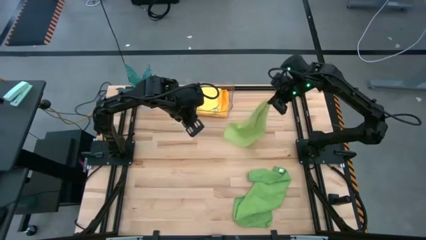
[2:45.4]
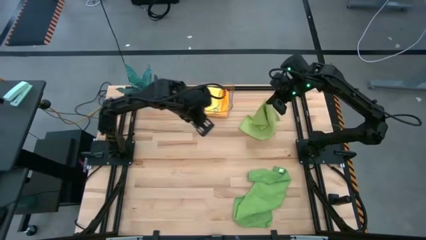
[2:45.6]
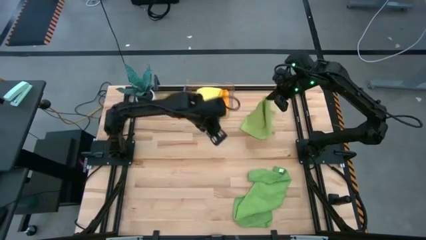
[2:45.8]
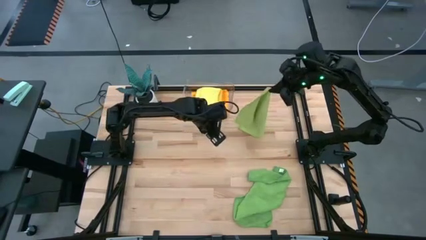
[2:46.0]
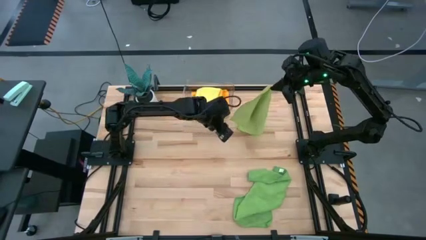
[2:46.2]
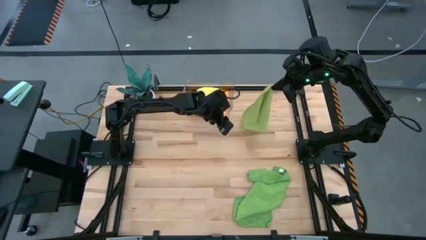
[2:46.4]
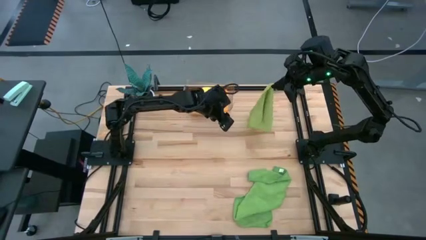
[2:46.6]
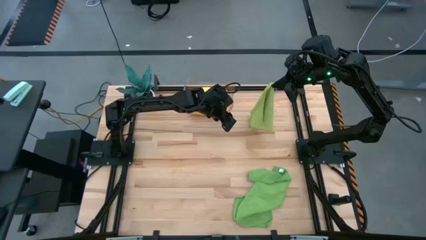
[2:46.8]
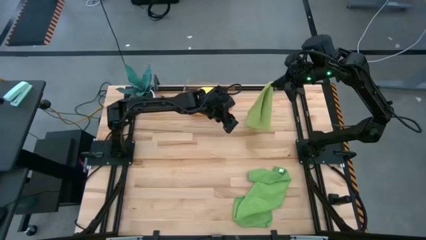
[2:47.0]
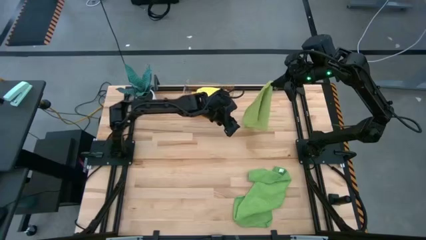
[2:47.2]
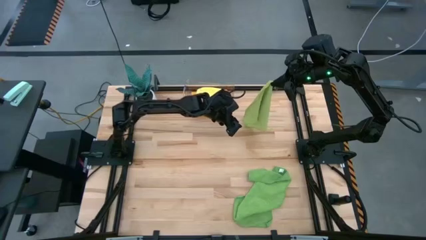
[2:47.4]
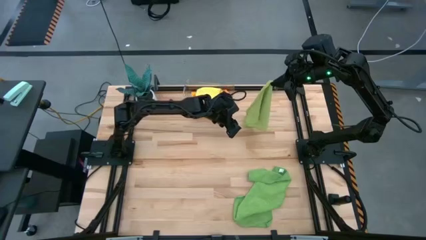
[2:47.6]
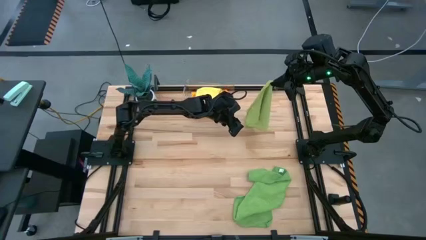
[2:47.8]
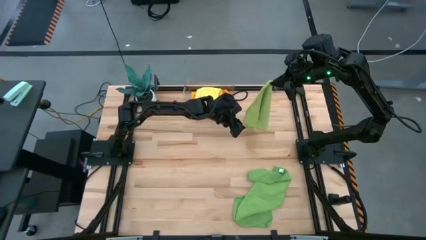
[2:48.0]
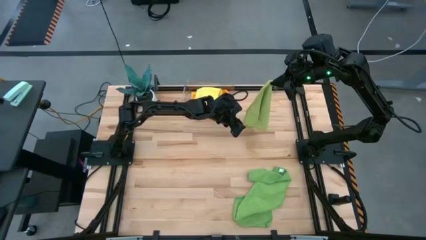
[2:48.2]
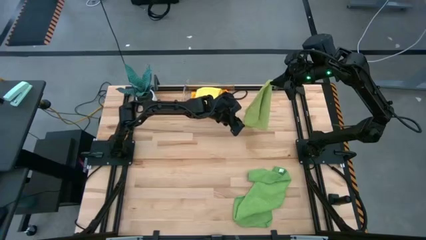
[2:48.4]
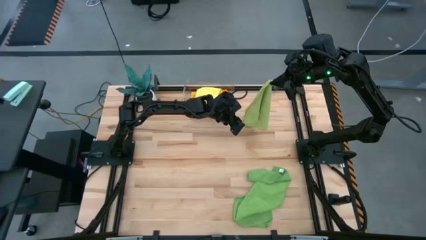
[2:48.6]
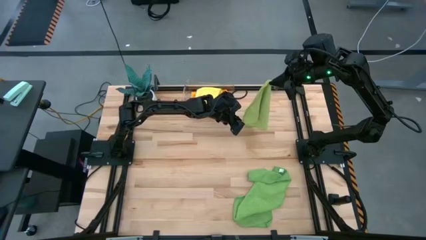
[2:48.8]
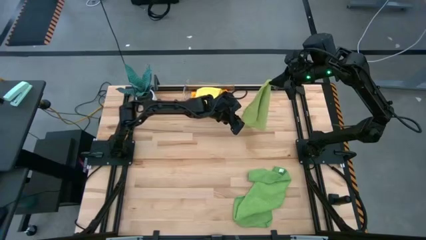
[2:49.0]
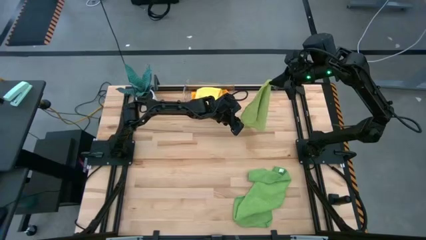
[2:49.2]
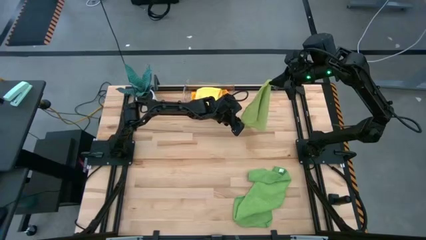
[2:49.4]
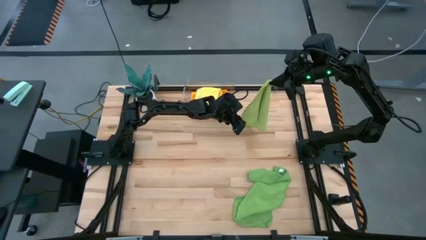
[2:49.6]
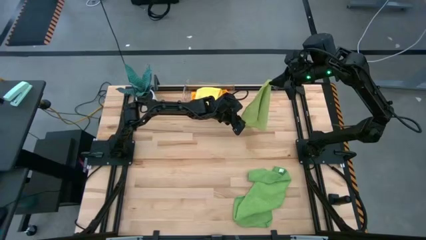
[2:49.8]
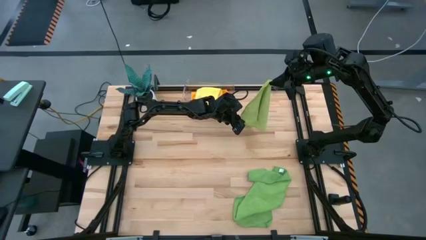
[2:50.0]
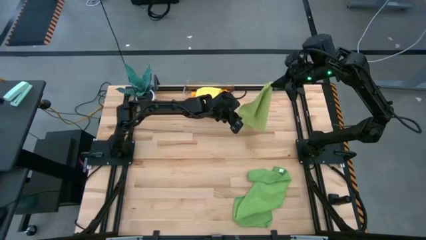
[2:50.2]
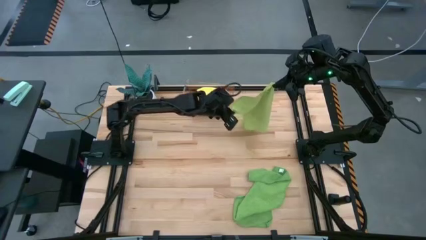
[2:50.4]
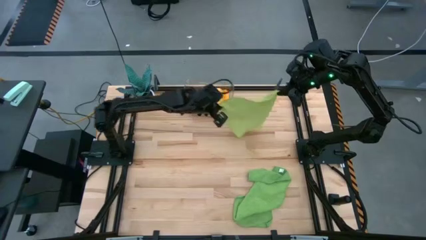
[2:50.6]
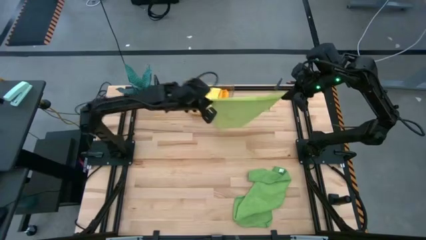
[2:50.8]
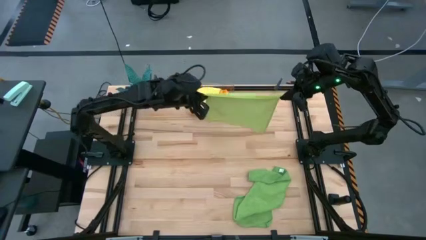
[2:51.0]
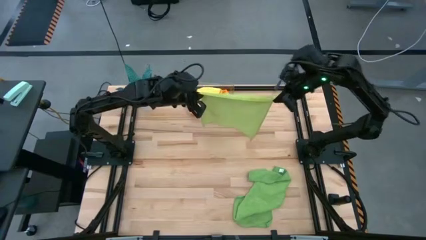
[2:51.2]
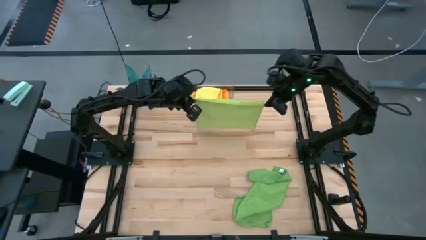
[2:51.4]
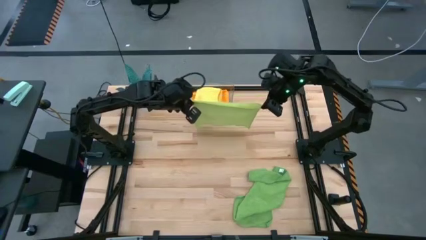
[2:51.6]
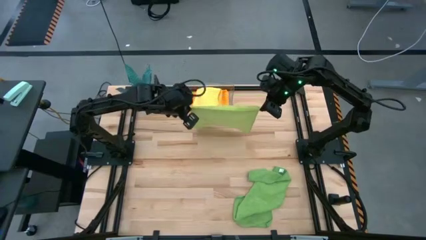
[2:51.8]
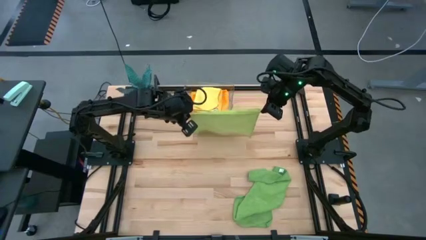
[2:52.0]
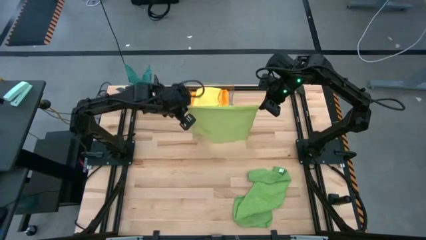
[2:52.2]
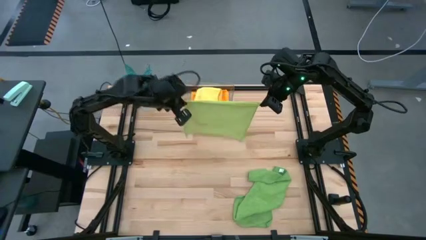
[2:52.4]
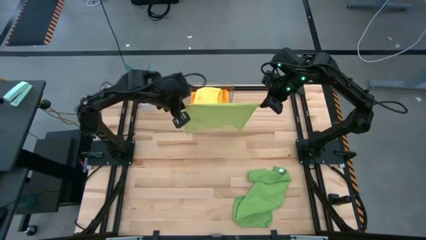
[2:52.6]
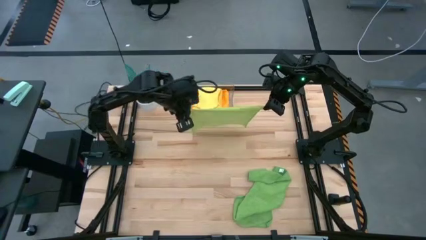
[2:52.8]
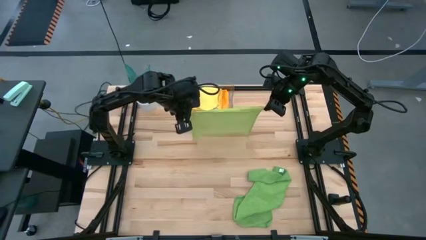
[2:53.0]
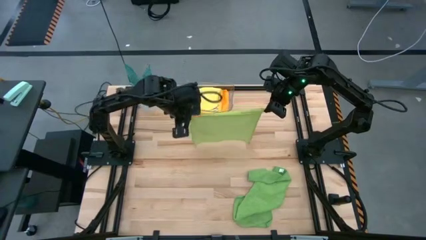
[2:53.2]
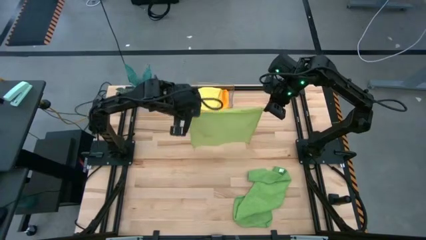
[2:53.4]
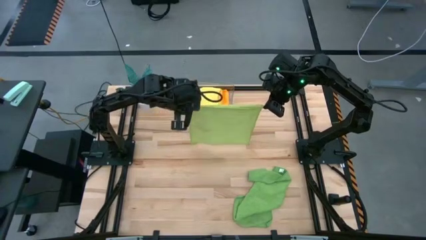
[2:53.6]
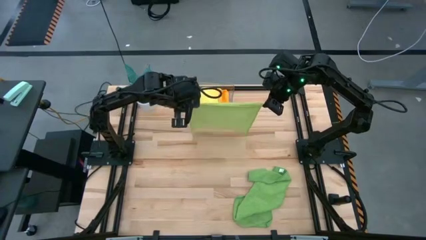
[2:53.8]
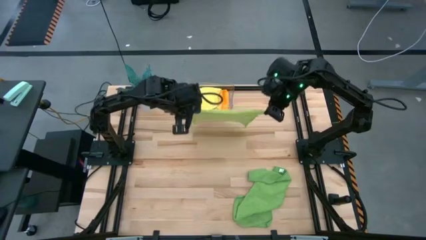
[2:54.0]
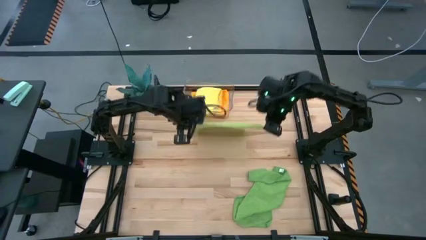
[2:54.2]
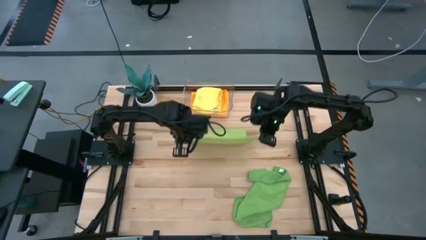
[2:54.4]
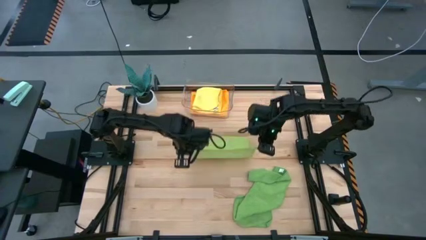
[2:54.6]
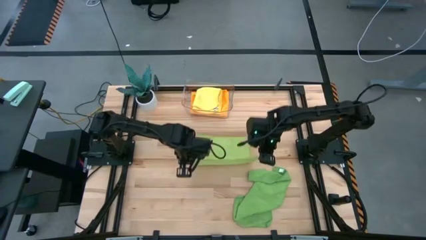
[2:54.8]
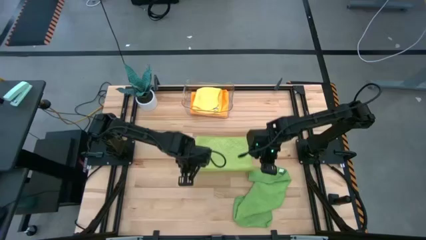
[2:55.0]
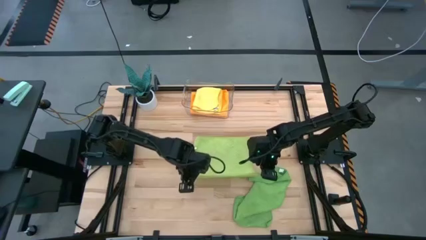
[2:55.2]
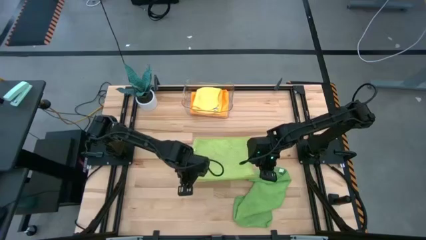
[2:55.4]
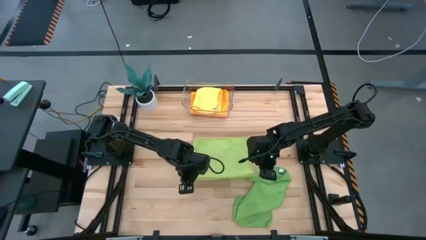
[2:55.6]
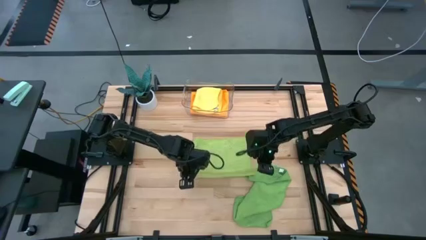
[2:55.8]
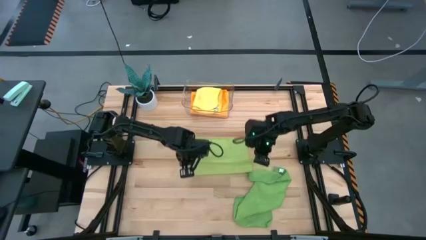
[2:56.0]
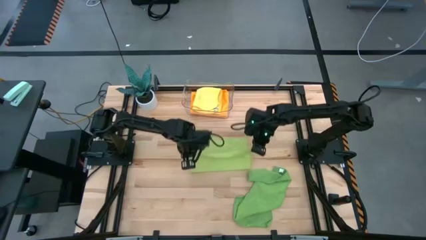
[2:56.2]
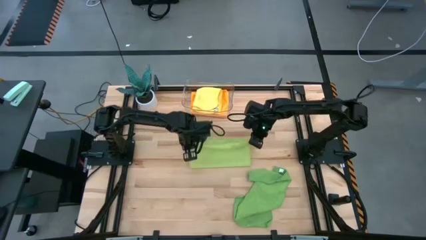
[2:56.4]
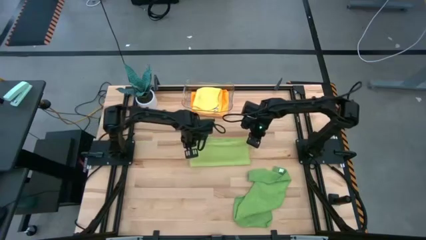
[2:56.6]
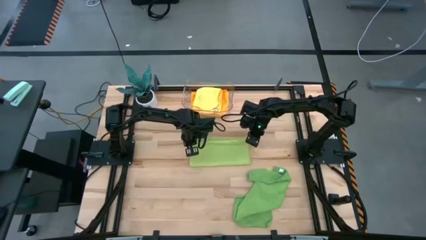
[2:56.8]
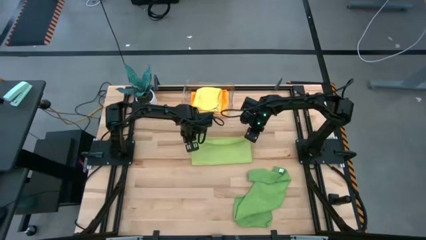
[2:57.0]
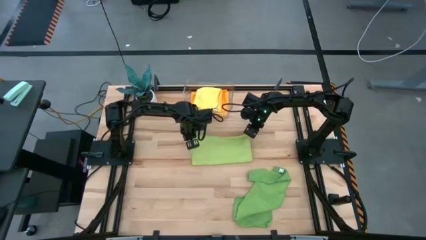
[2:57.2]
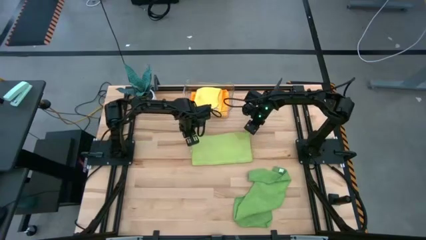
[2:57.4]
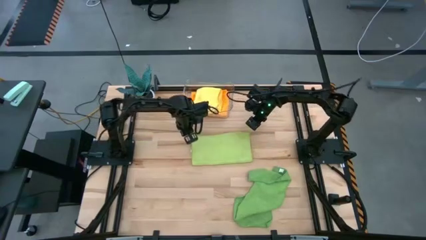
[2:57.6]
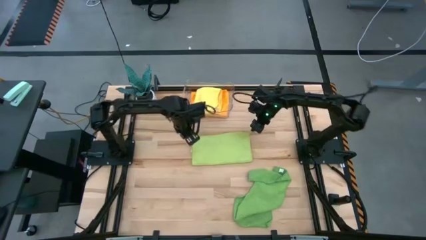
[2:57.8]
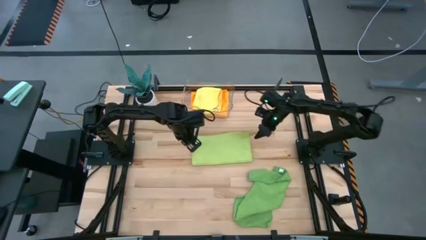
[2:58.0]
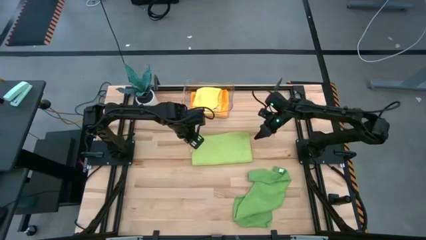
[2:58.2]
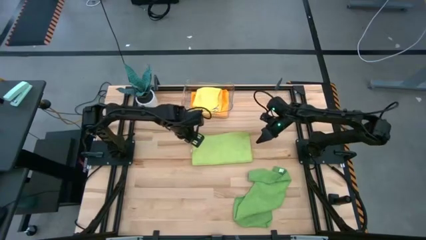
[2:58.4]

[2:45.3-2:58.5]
Task: Fold microfiber towels
Fold the light green towel
